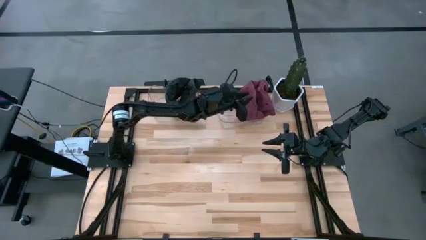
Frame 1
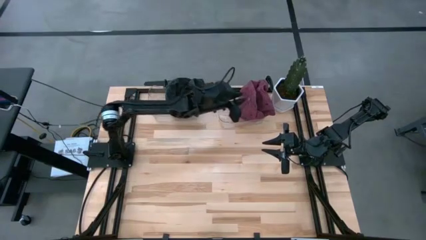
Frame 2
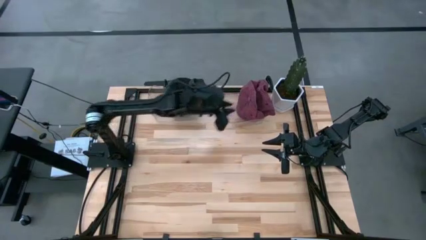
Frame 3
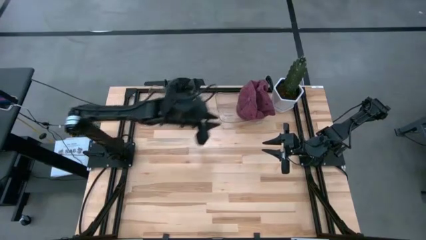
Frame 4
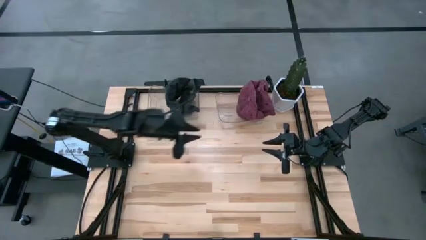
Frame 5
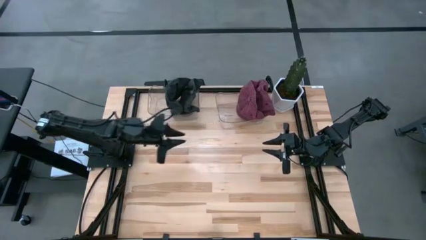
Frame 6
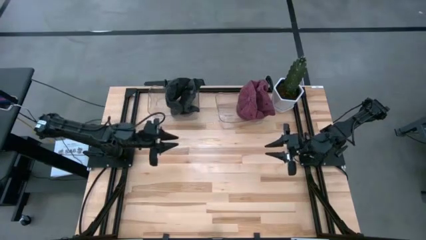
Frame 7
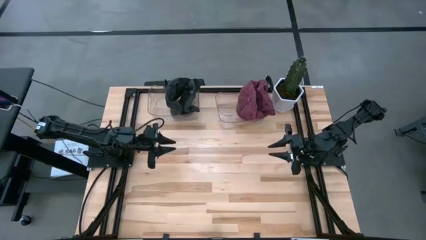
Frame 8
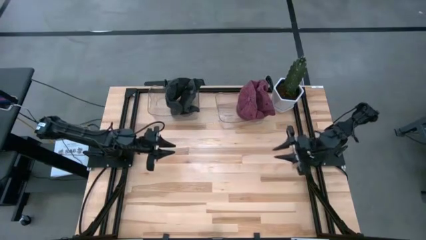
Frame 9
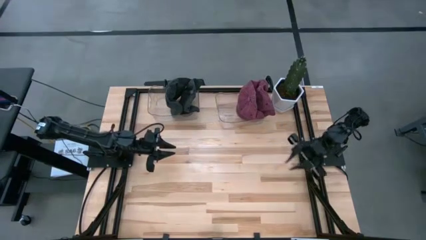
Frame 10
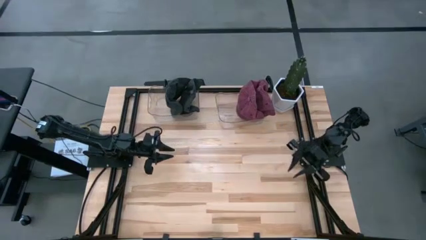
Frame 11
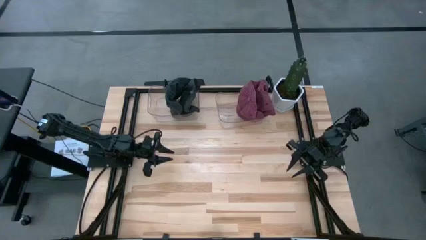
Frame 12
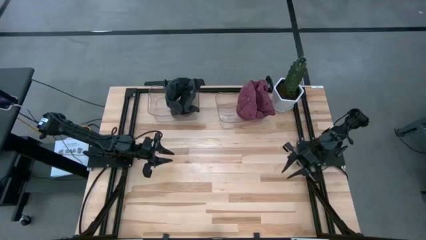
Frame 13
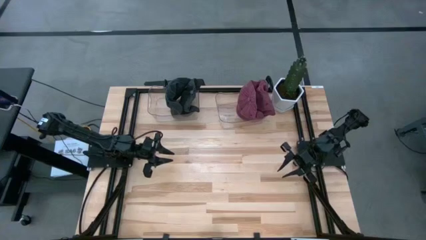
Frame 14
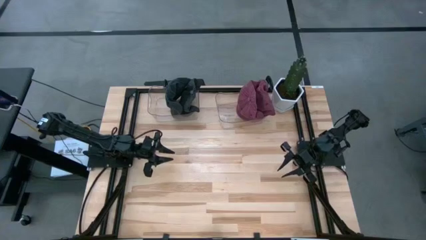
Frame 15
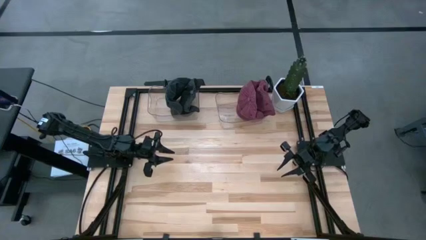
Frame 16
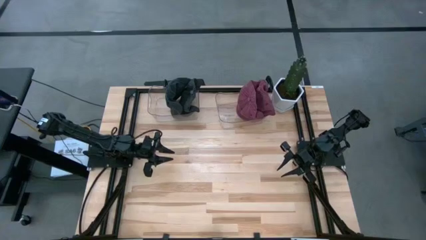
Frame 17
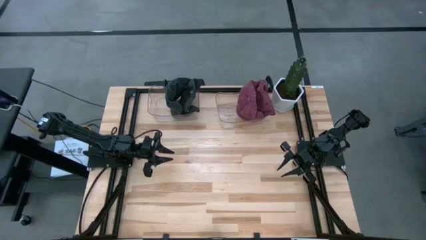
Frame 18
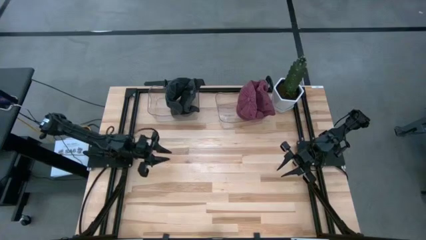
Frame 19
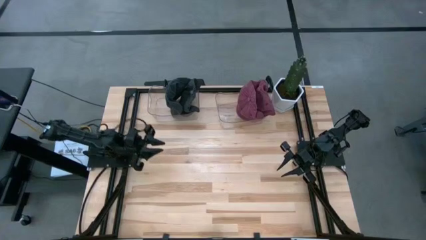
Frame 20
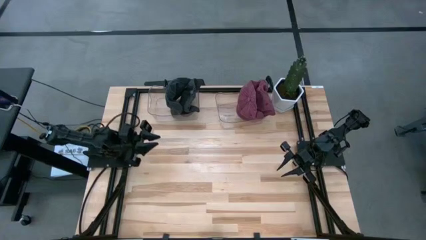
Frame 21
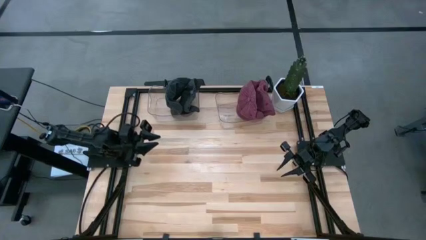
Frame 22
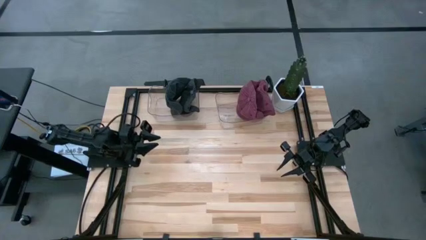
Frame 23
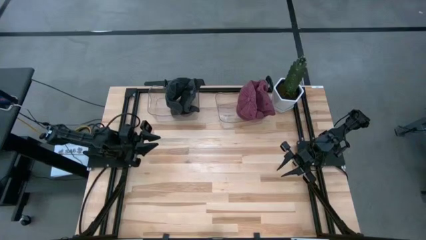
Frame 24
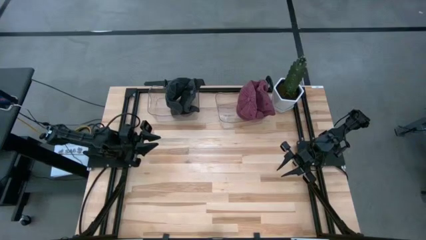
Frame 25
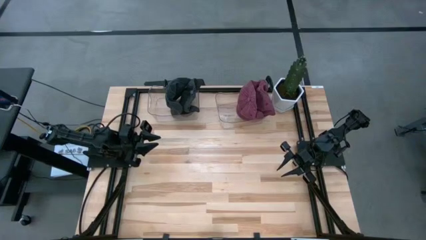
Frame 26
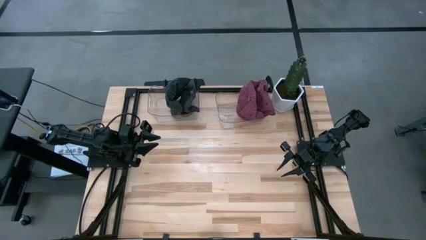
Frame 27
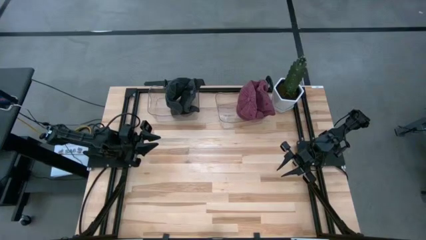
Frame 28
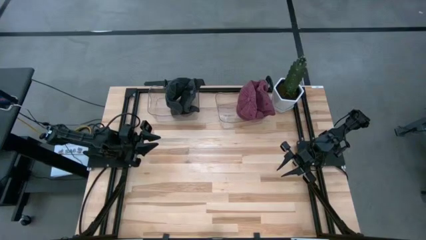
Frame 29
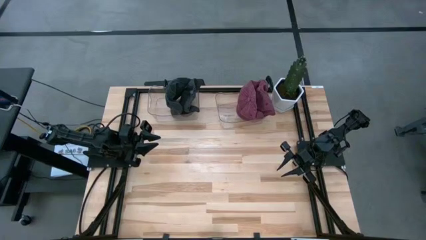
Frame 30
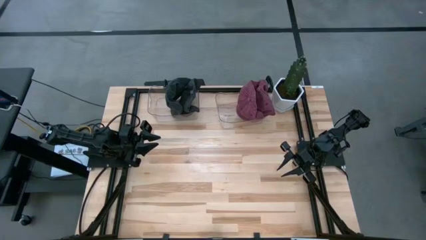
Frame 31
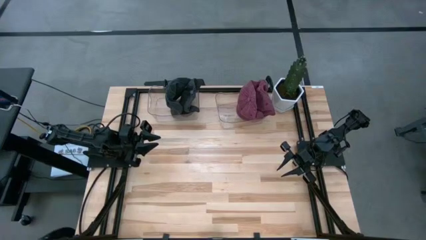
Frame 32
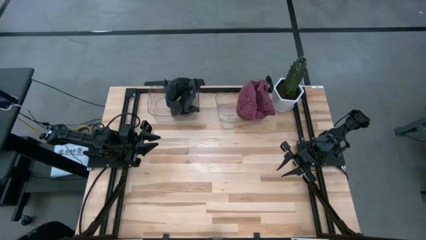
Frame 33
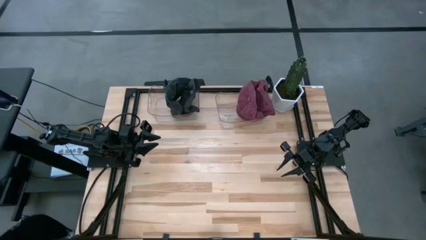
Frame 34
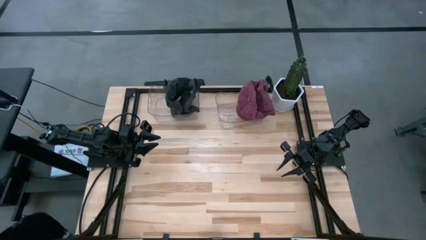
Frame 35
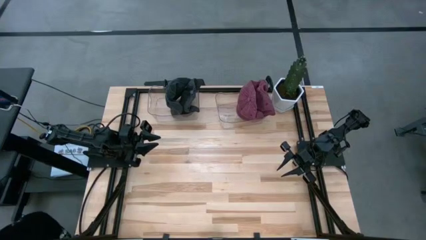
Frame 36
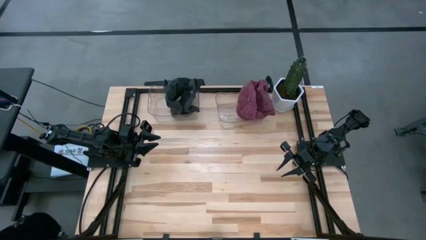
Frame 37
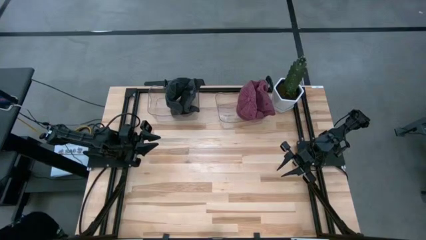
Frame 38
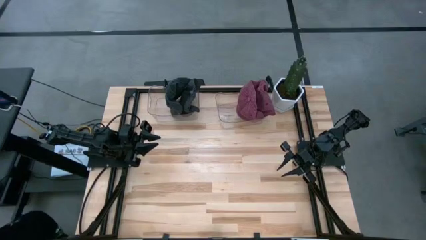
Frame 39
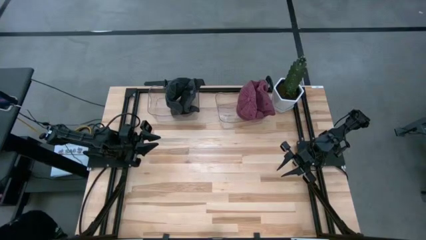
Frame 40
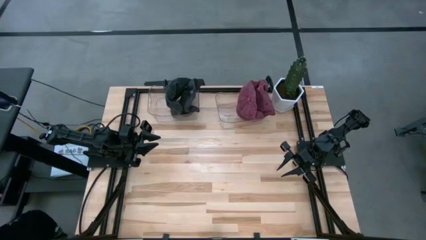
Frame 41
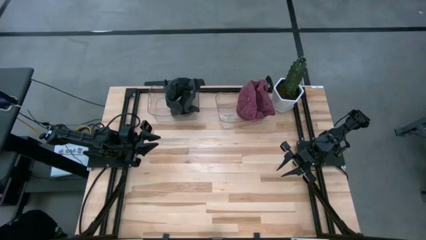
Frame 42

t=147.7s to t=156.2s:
Task: Pick & Place hat
Return to Home Position

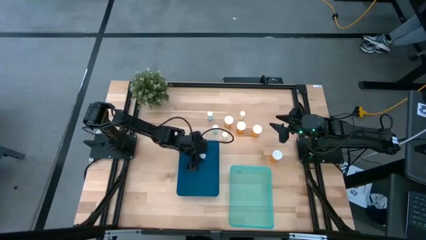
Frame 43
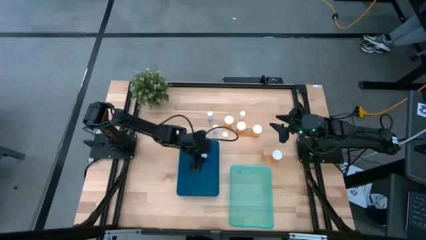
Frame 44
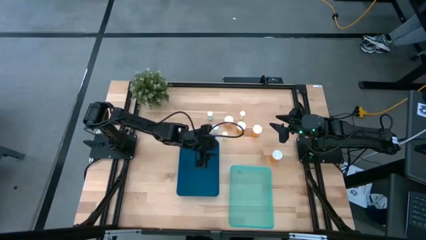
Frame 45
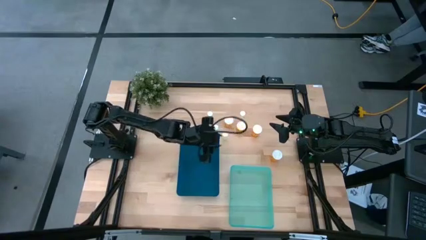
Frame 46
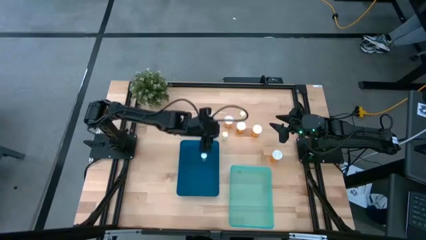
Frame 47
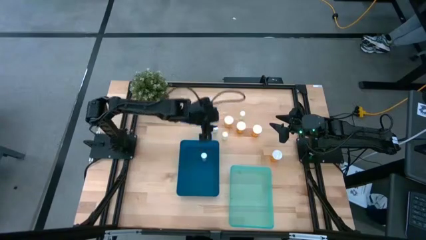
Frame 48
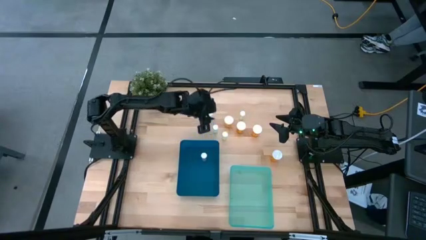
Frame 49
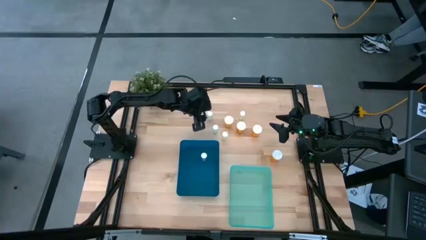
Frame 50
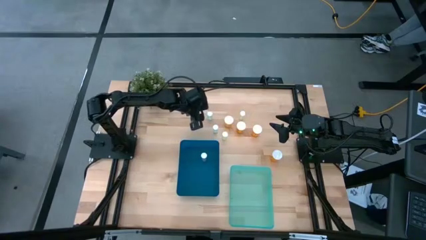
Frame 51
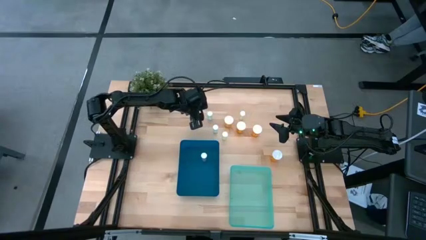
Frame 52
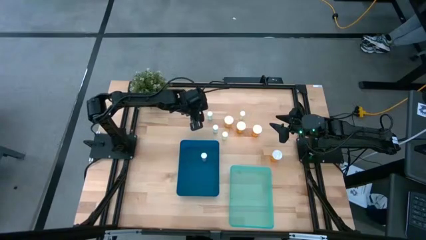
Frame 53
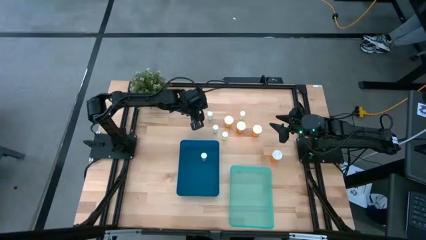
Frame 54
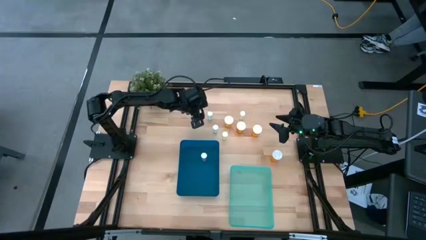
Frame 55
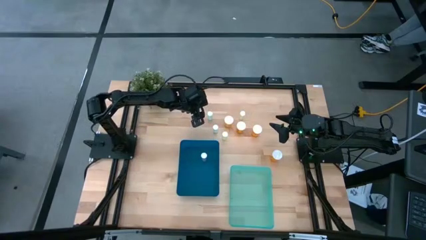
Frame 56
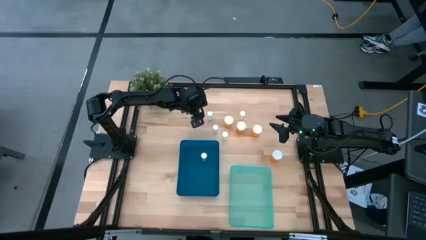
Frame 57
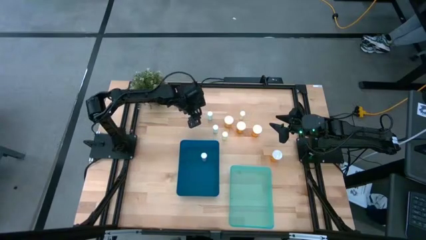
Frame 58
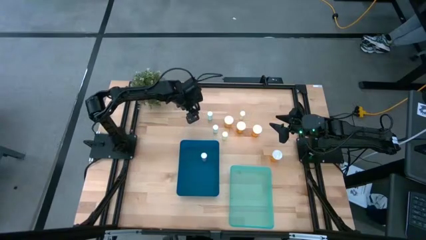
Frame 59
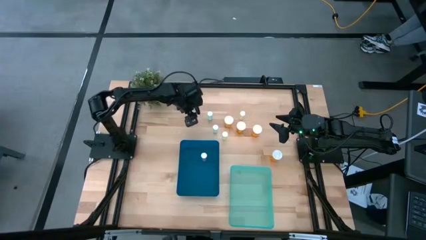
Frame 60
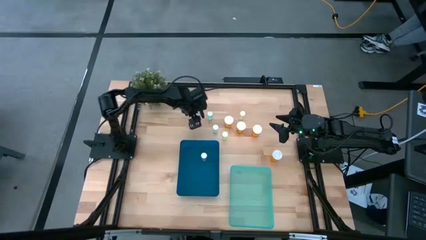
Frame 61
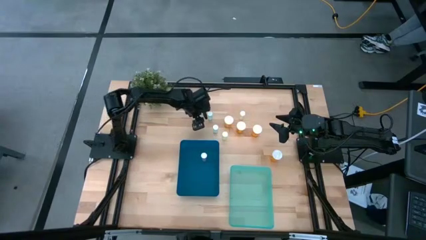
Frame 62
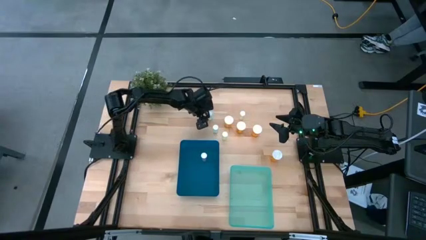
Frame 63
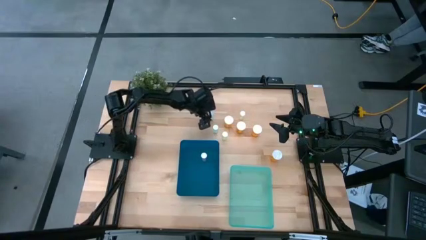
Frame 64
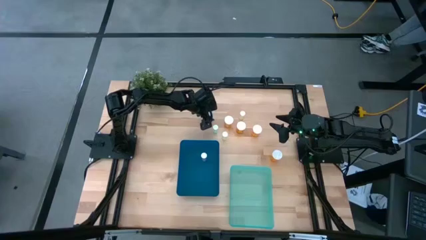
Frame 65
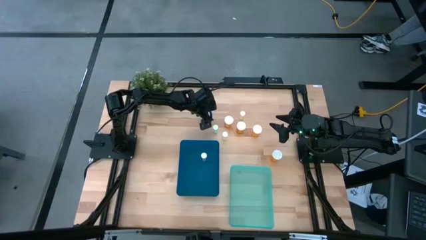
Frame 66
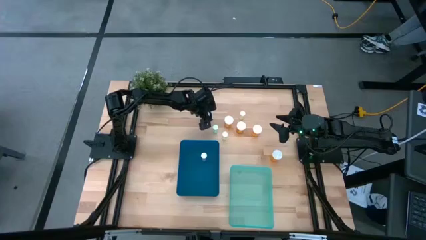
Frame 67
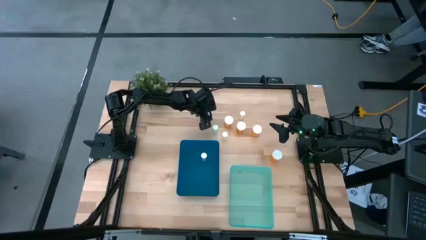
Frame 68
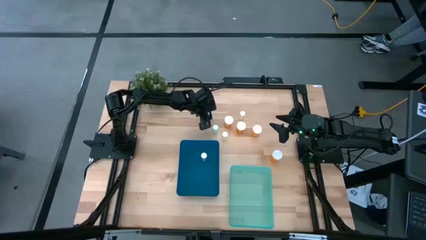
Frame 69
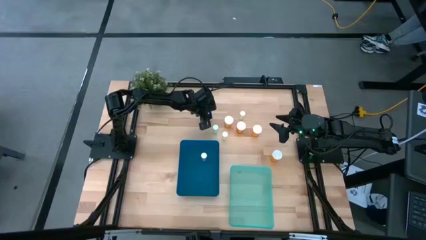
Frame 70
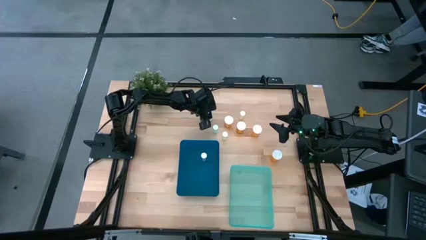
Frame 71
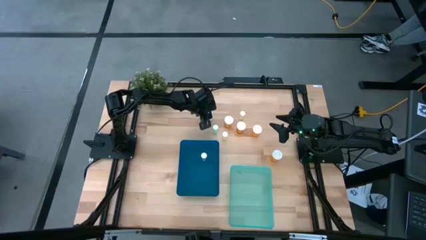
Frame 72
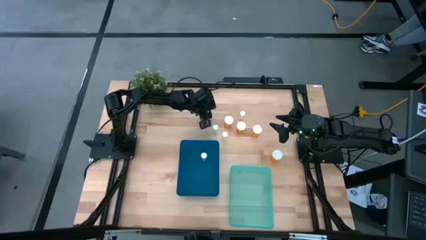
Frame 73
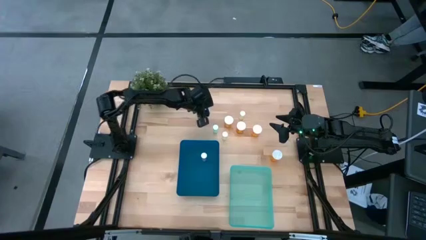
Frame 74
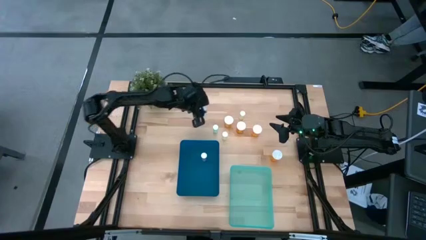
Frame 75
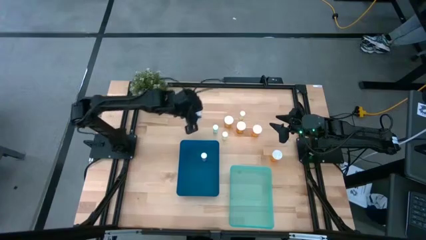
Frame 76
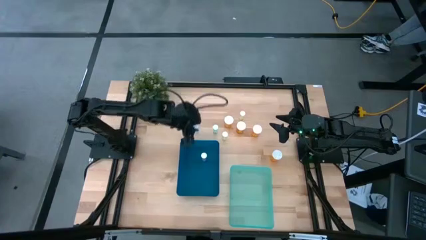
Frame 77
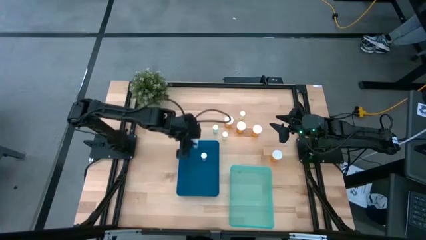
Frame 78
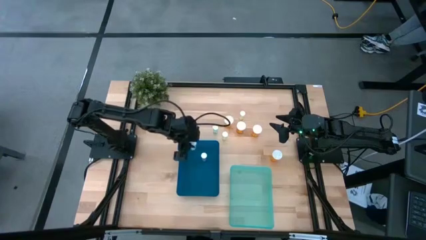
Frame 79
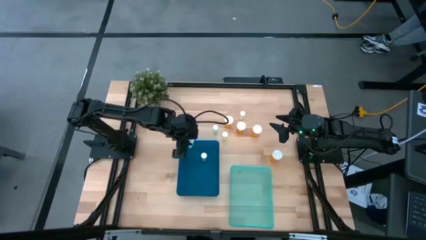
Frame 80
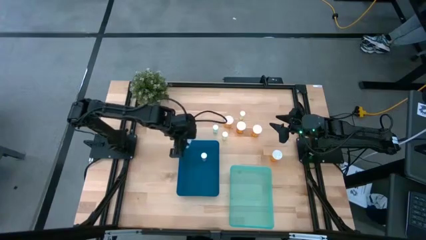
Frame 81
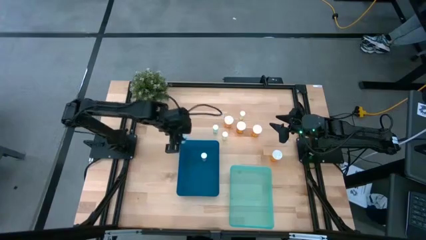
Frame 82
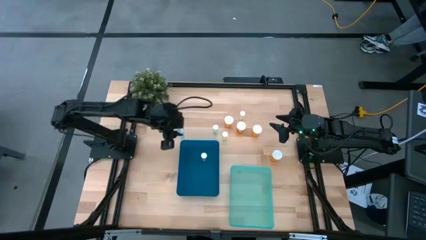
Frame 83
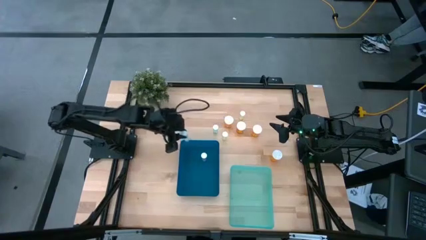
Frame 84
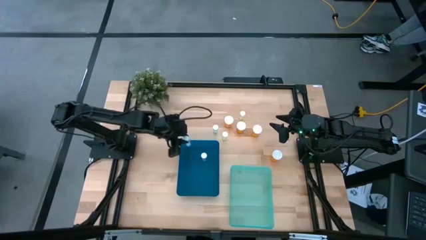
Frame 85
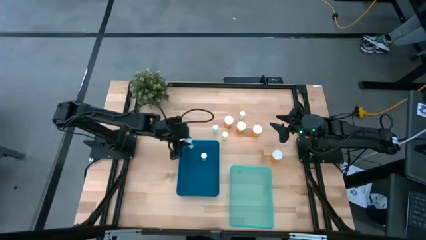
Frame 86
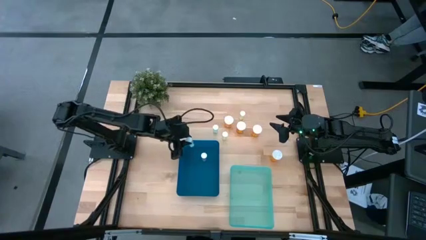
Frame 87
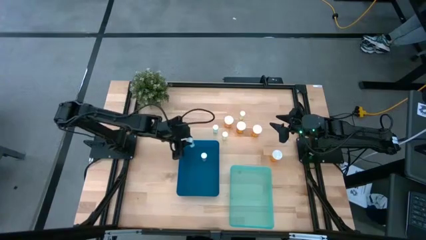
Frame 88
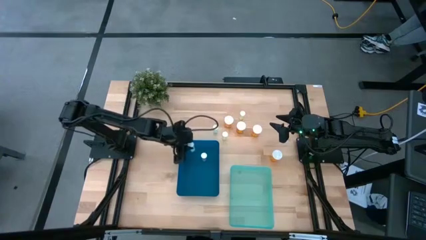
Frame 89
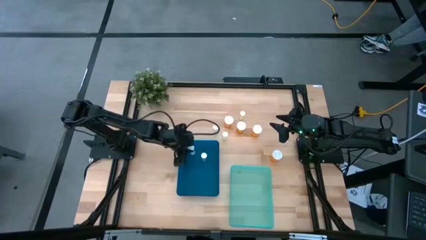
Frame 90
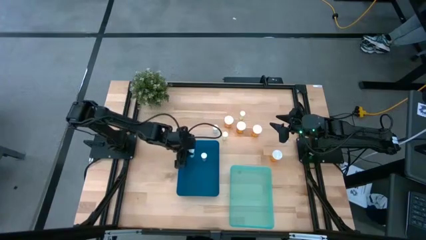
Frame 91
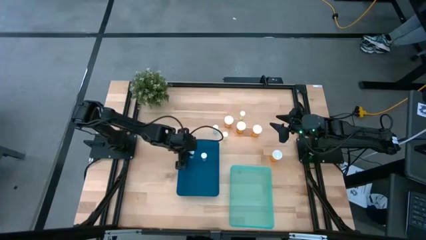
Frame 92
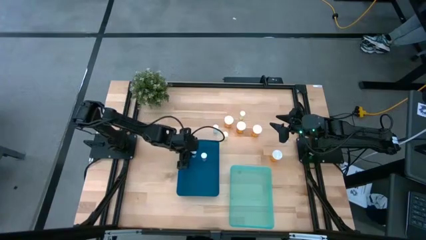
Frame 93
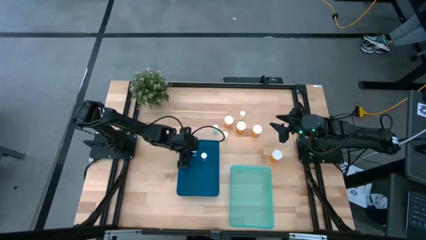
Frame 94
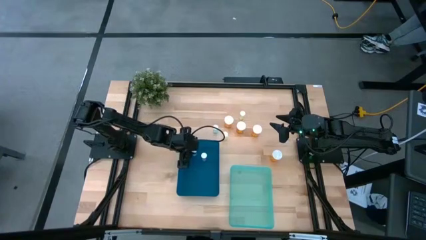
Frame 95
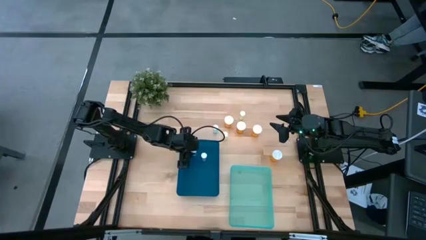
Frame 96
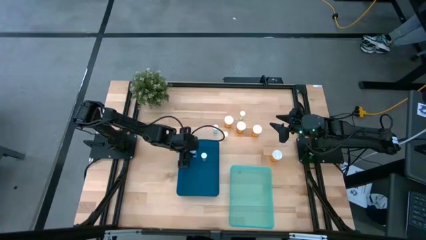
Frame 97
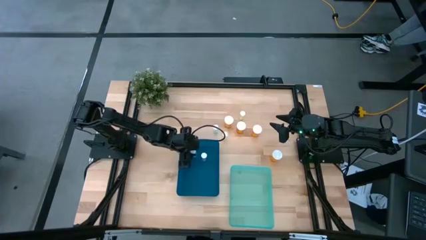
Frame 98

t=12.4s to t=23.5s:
Task: Pick and place medicine bottles into bin by pill shape (circle, oval)
Put the top blue pill bottle into the blue bin
